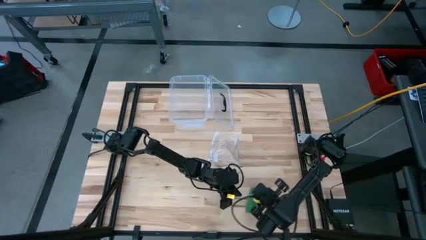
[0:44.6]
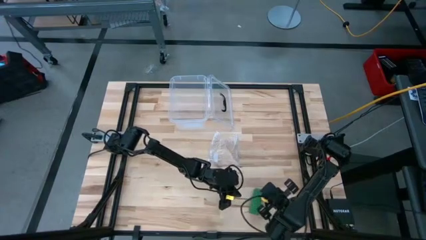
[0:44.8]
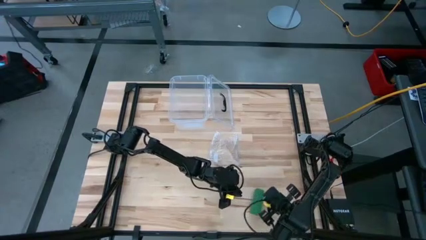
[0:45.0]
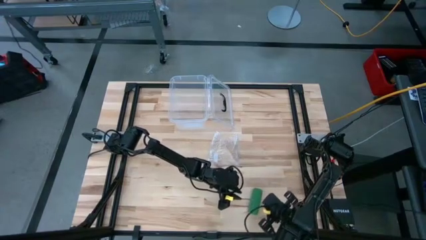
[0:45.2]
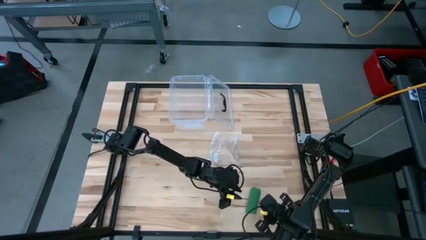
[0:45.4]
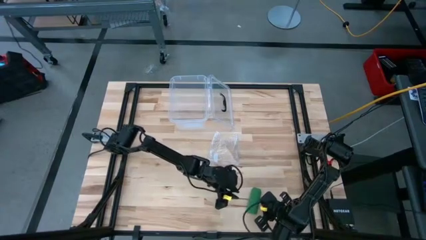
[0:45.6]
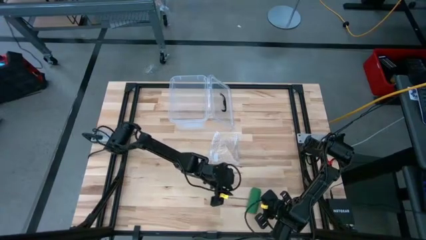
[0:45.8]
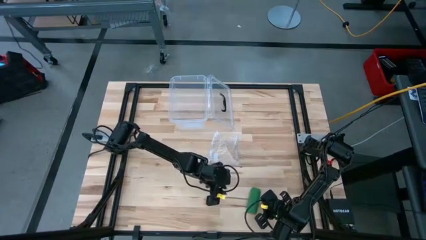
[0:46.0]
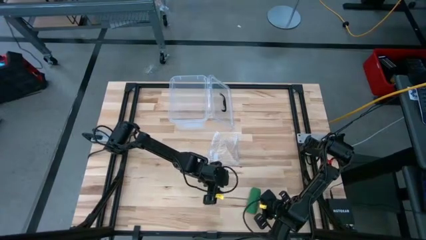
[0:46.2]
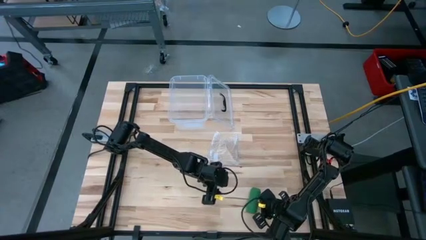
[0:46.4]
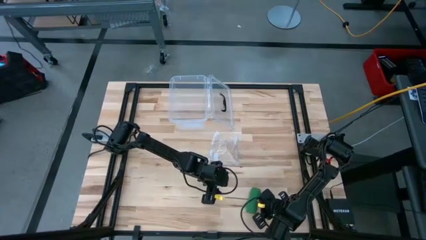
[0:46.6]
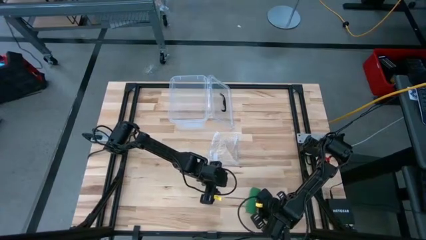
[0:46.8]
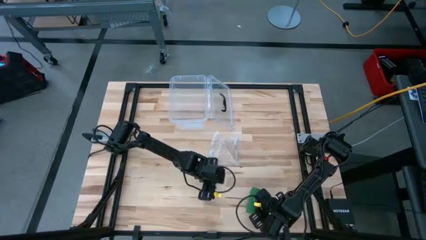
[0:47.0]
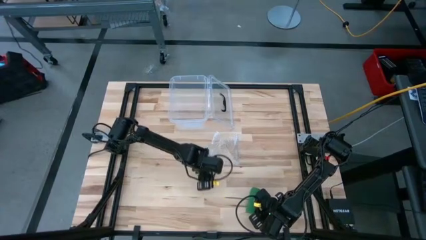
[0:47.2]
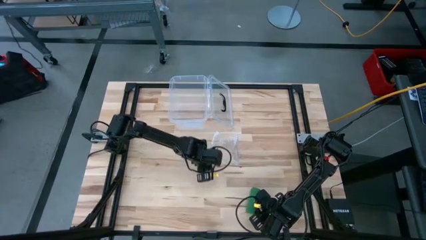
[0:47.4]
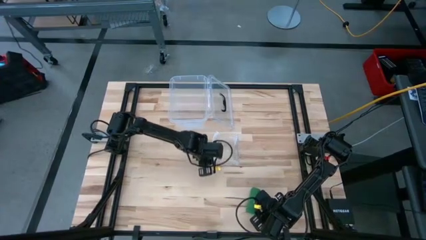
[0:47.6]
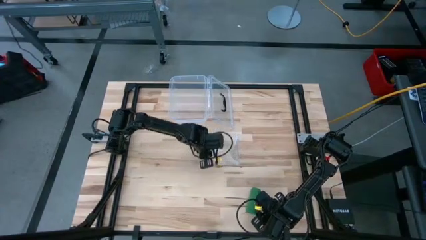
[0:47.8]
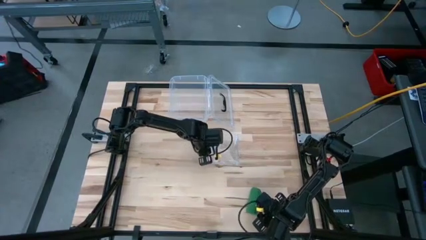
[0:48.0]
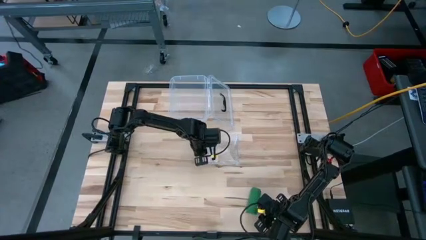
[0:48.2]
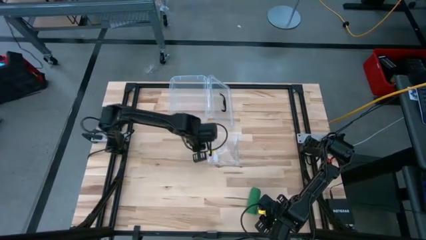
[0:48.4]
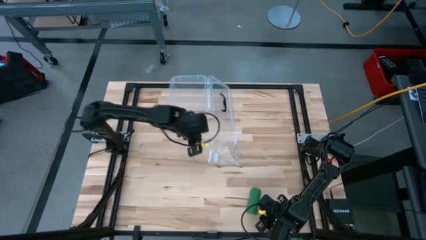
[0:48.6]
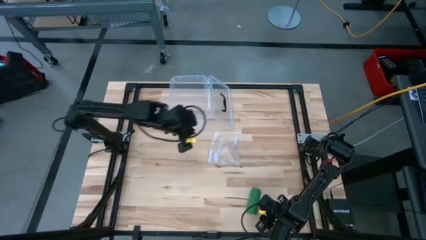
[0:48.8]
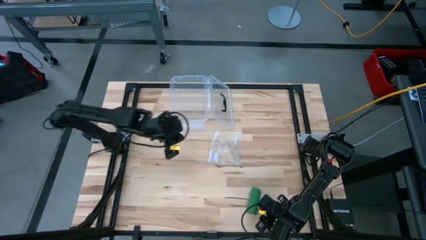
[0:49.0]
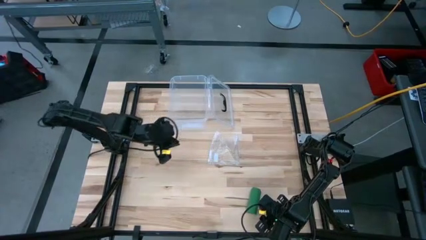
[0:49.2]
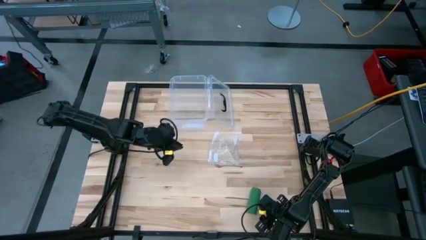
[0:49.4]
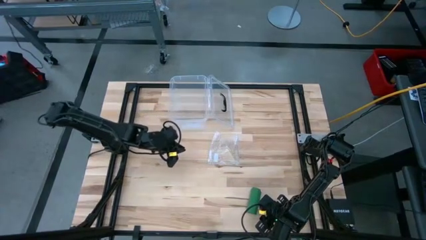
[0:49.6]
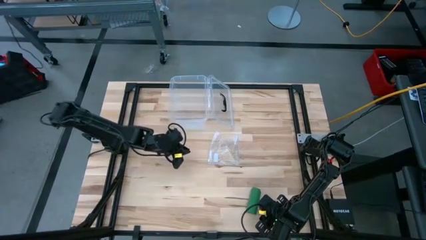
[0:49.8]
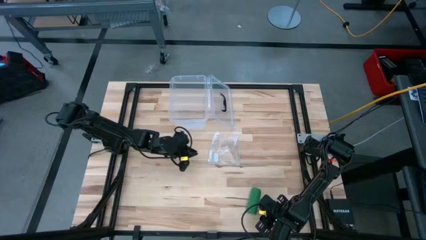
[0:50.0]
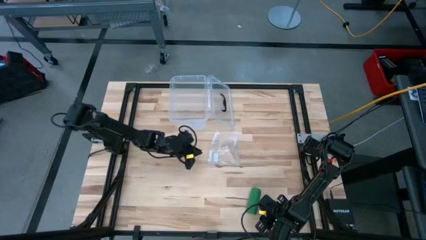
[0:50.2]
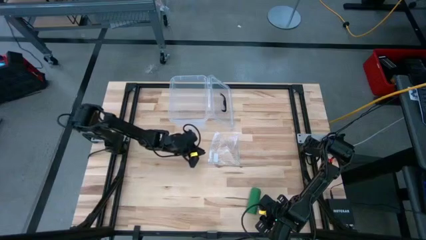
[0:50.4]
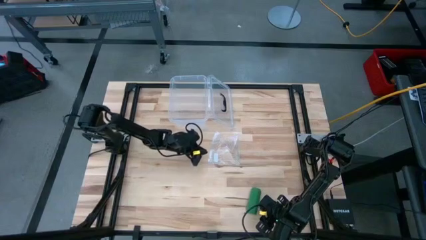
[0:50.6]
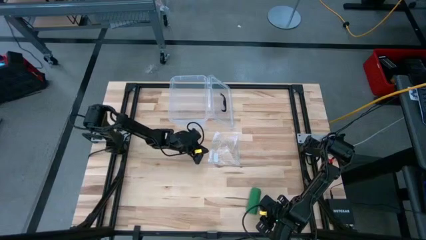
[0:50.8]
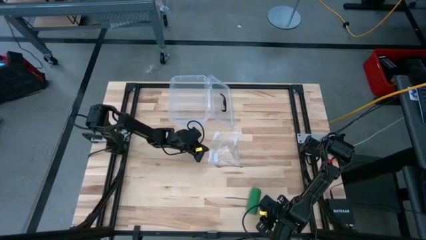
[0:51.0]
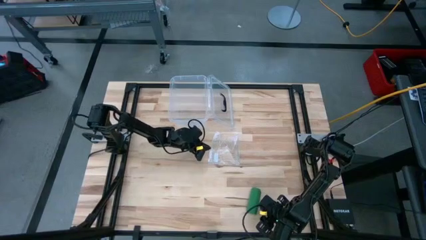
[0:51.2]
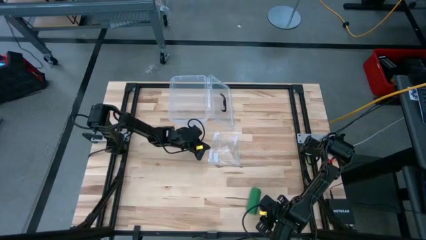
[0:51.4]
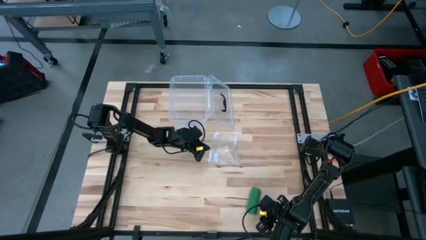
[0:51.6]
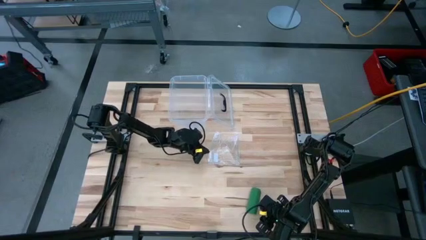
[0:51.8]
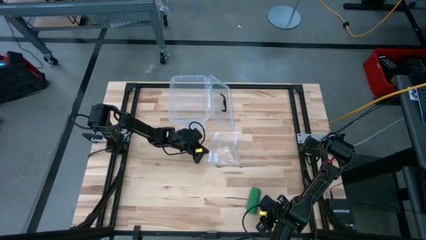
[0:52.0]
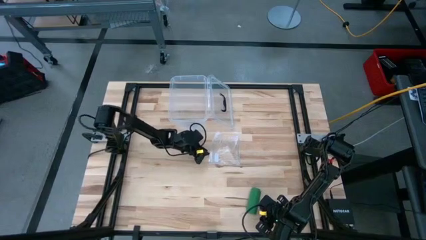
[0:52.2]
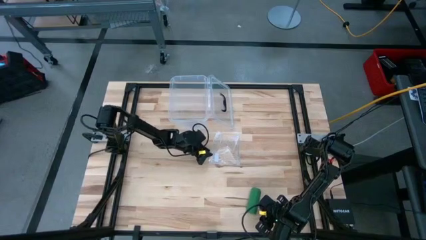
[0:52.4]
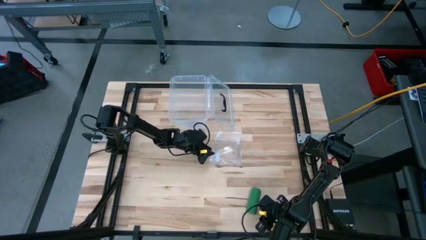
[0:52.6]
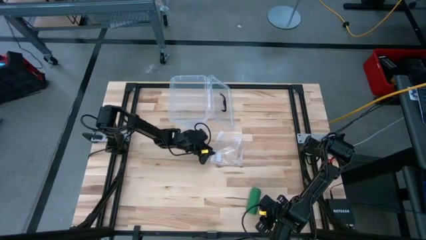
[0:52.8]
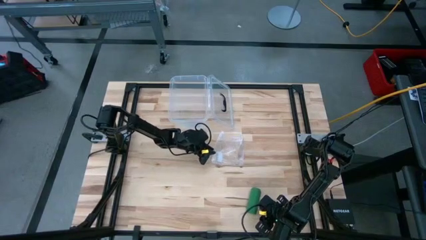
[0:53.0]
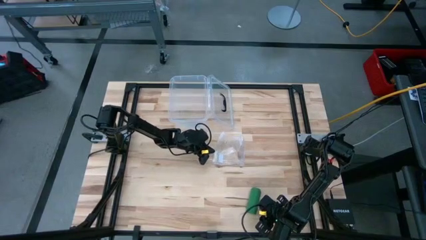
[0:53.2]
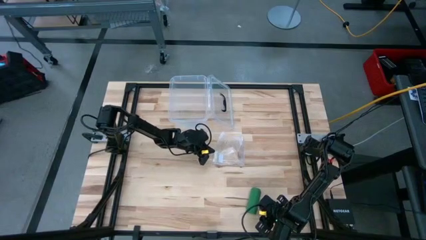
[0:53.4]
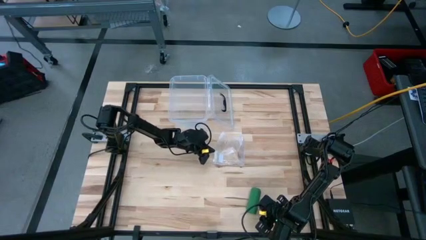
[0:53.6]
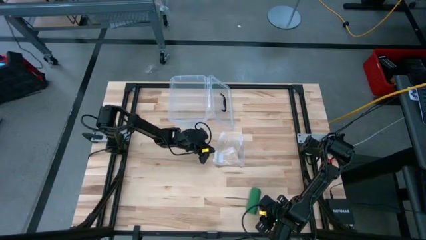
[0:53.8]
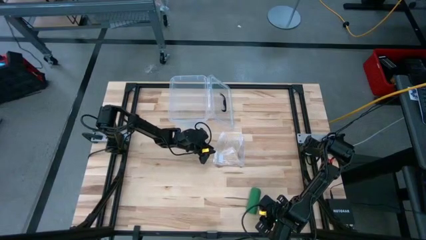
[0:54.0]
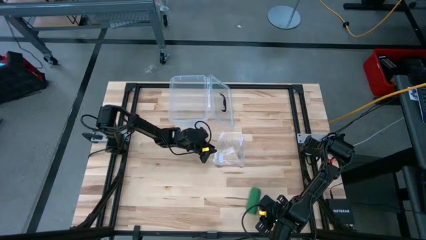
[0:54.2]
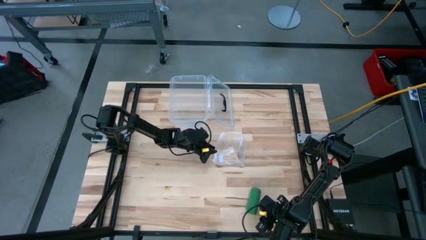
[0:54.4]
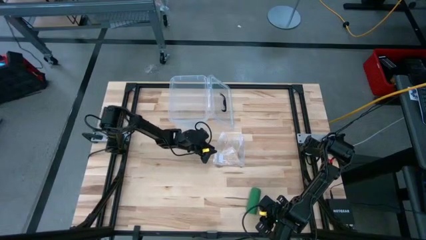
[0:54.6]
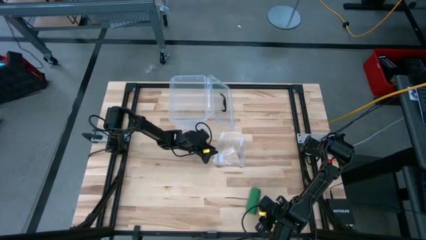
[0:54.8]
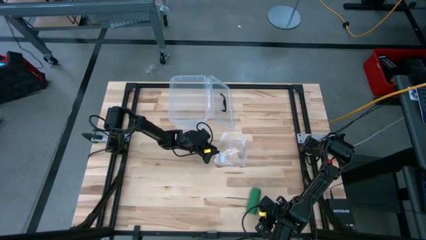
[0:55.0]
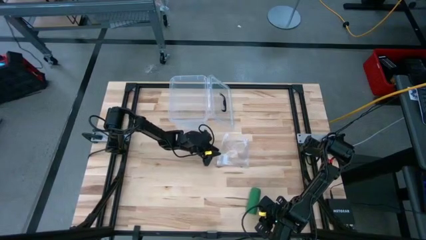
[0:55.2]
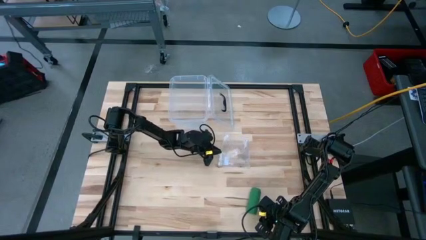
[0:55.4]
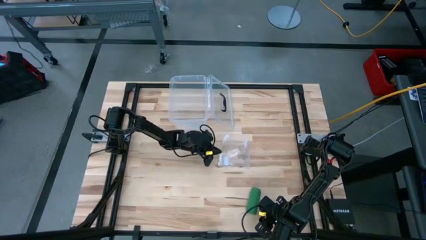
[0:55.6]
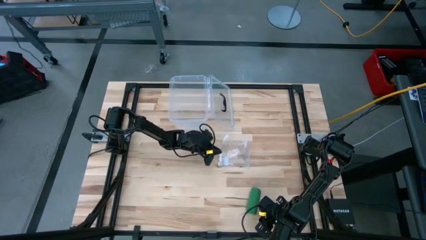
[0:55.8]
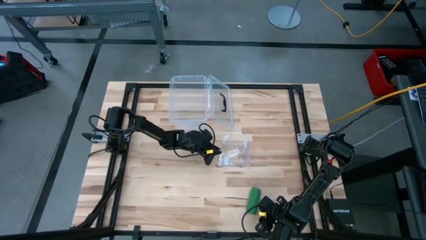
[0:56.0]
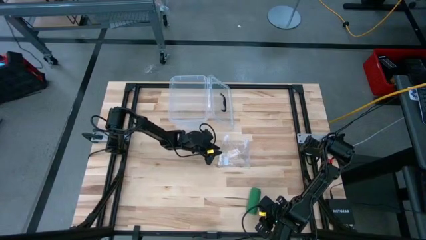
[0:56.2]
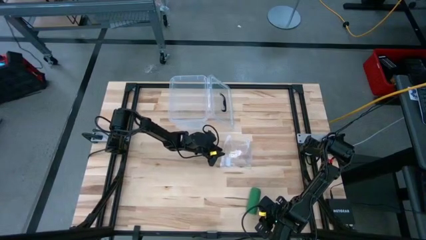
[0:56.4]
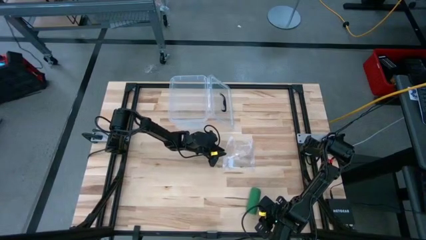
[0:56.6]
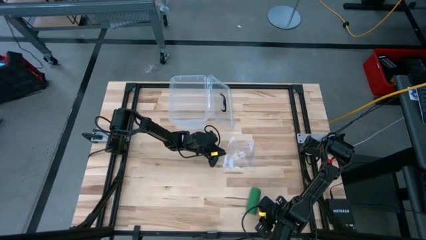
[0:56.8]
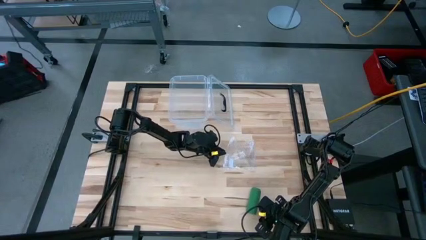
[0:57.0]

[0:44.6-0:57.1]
Task: Roll bandage
Prepare the transparent zip bag

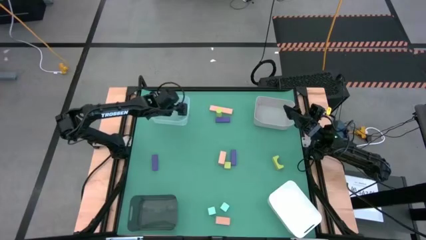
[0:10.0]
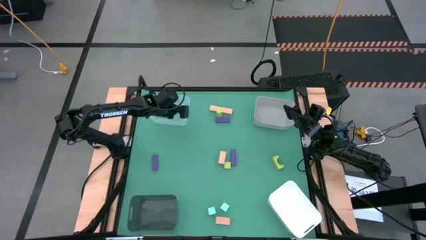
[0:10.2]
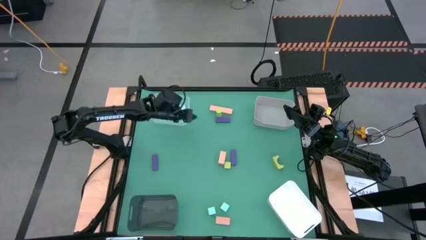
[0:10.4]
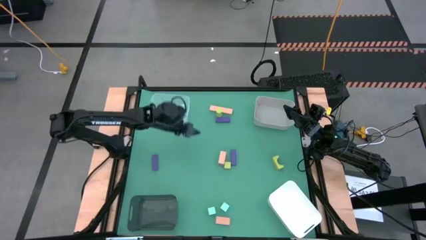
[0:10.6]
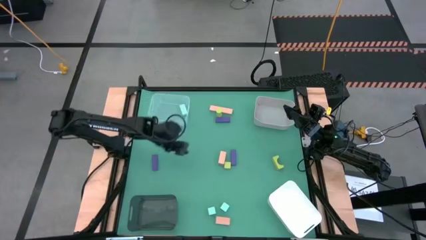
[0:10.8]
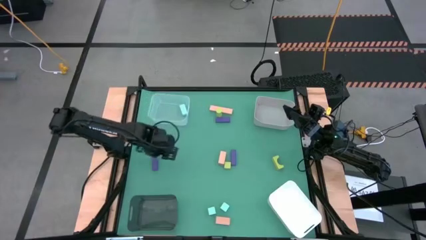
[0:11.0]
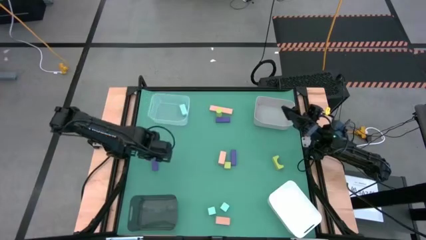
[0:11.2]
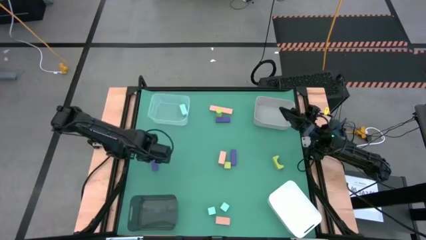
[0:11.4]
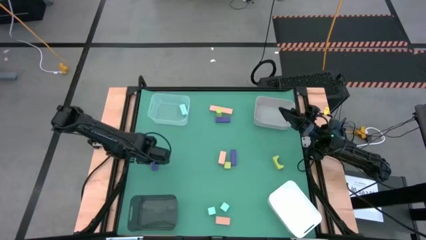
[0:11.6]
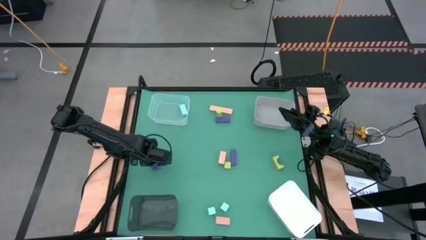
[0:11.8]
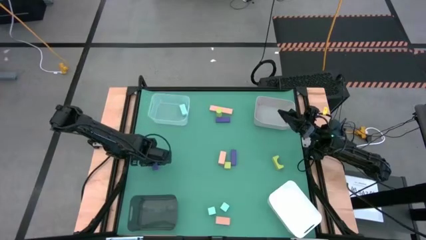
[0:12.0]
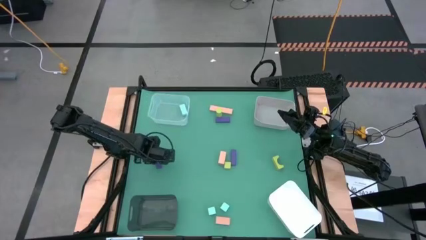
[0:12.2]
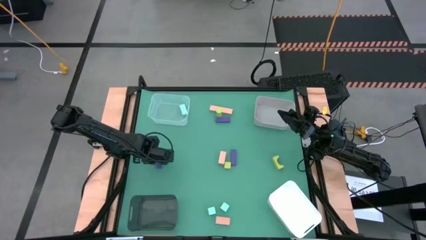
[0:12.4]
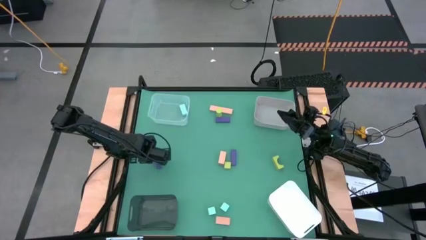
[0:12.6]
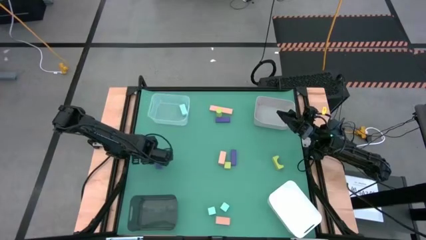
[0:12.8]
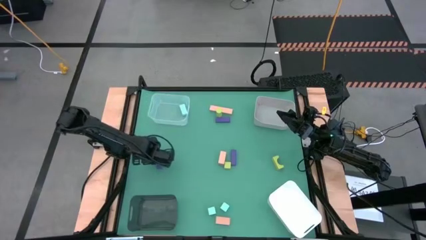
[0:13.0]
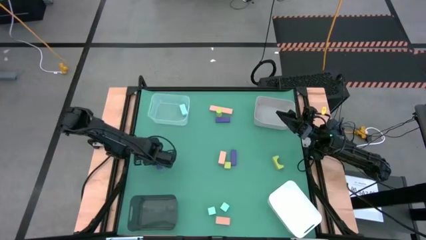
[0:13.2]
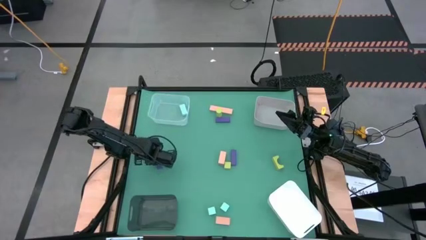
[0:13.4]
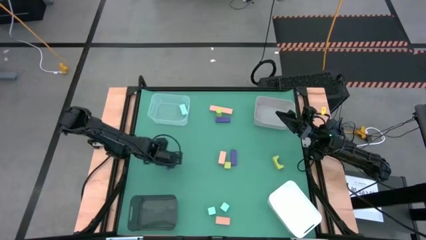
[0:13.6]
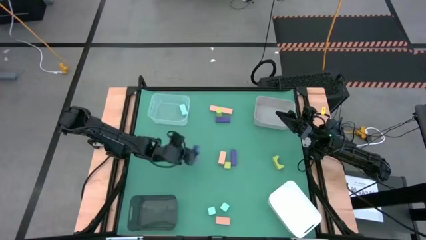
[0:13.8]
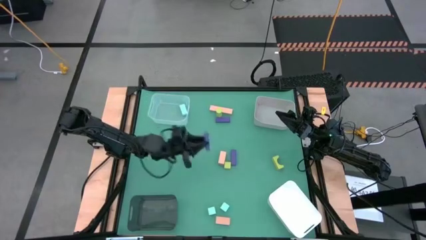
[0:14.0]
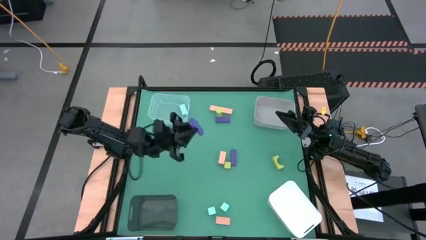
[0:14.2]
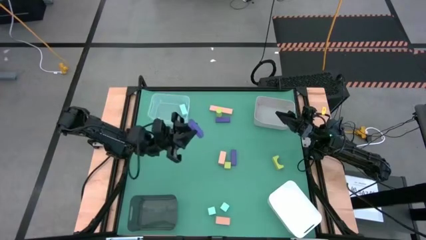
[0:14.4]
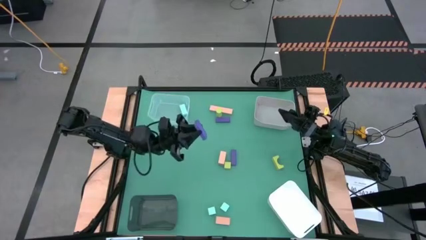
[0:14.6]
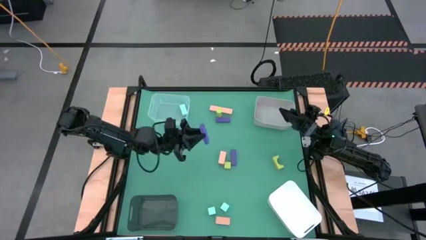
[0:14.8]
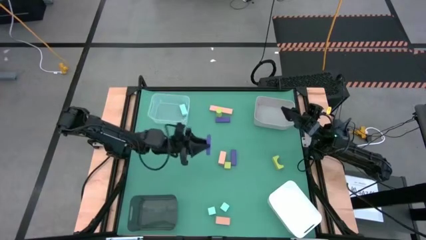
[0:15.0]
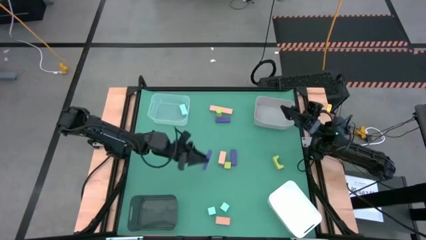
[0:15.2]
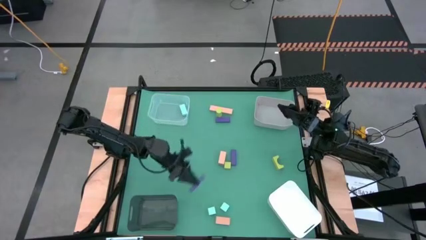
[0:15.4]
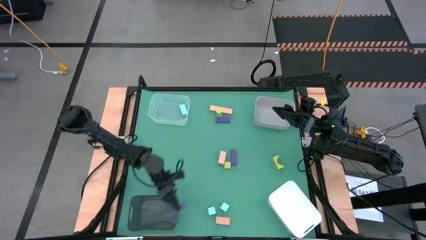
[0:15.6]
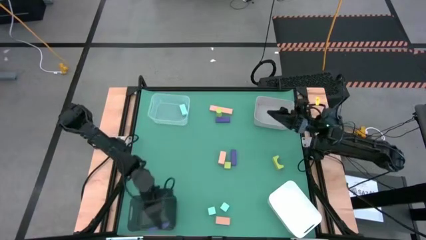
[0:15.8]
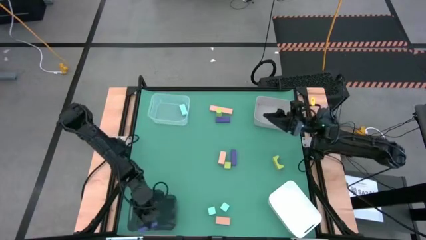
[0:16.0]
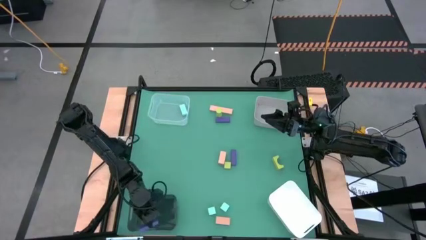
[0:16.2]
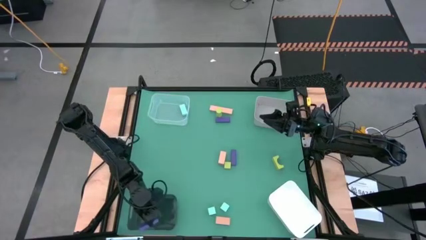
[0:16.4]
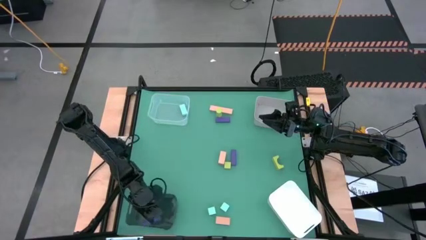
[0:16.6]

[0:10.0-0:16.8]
Task: Sort & place blocks by color
Put the bottom left violet block into the black bin
